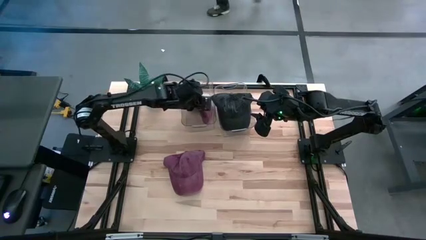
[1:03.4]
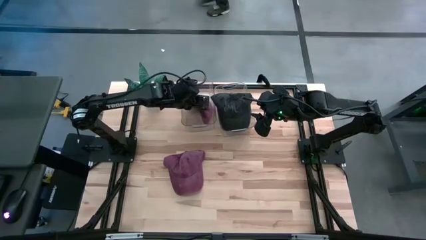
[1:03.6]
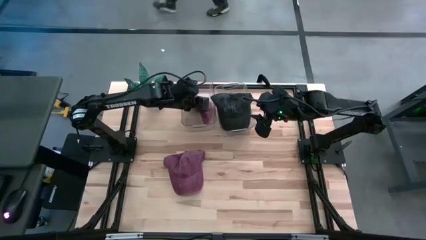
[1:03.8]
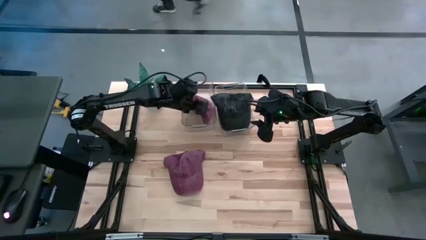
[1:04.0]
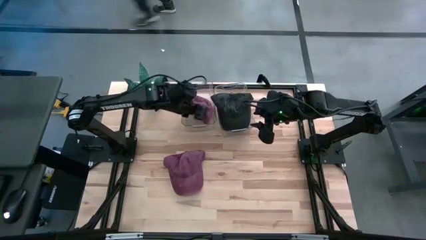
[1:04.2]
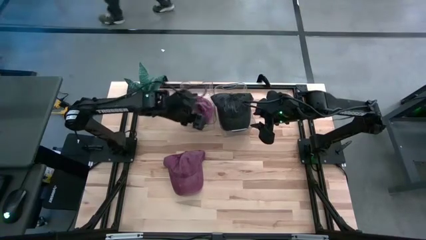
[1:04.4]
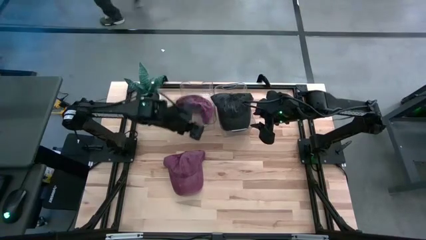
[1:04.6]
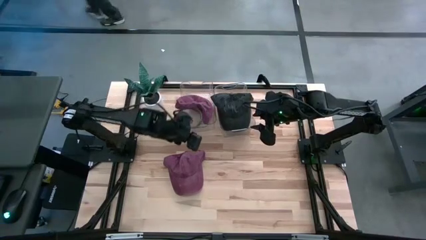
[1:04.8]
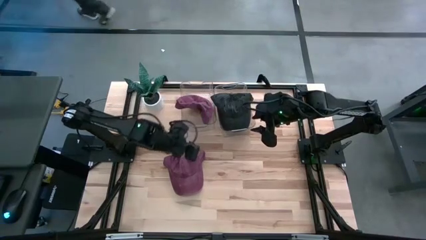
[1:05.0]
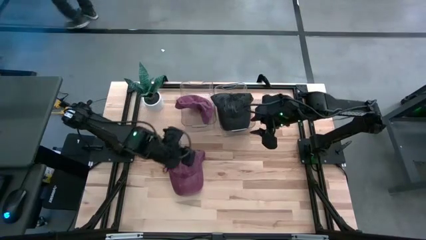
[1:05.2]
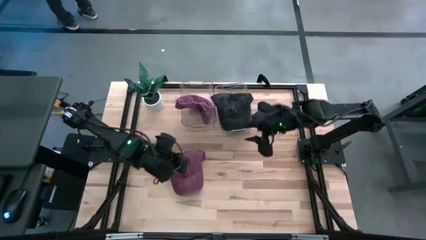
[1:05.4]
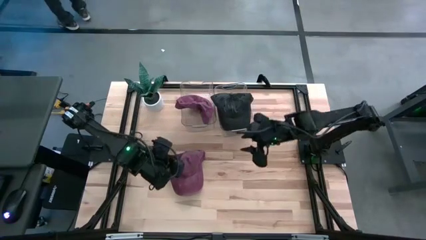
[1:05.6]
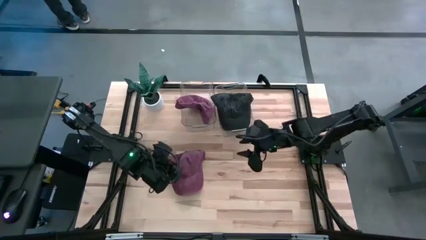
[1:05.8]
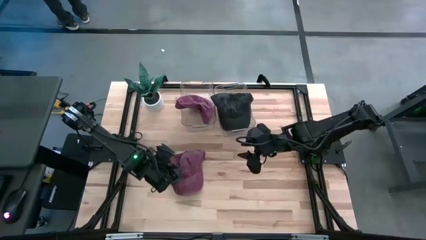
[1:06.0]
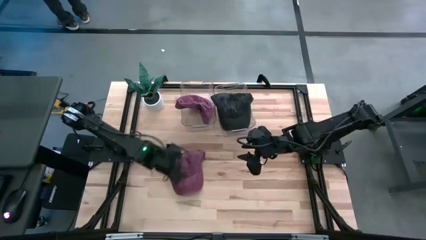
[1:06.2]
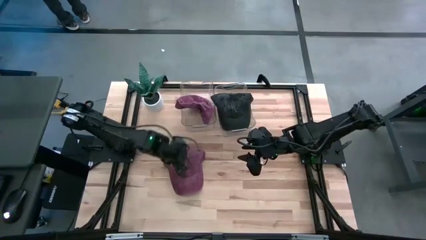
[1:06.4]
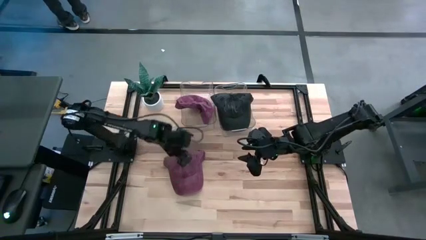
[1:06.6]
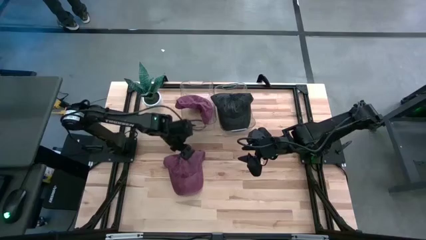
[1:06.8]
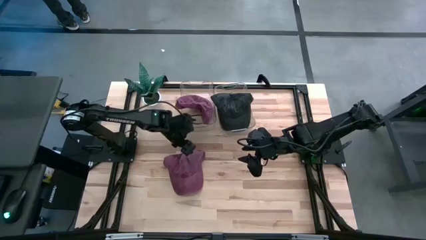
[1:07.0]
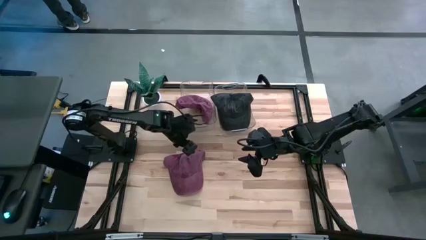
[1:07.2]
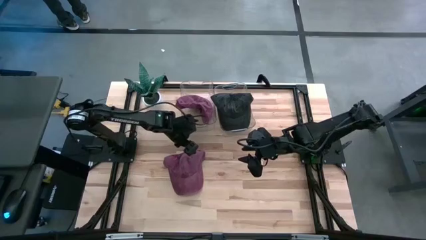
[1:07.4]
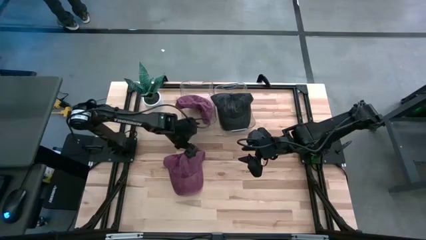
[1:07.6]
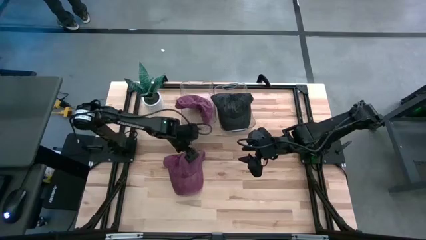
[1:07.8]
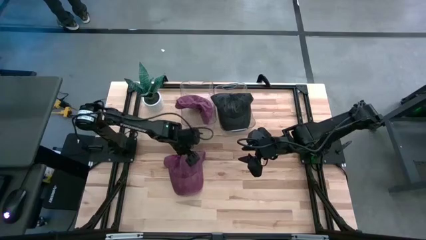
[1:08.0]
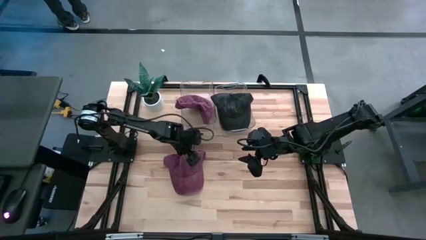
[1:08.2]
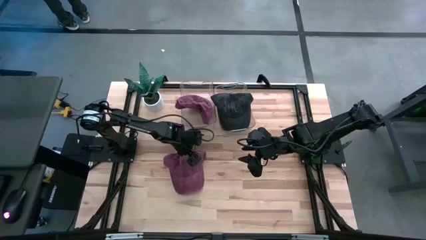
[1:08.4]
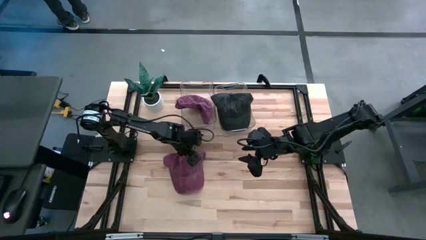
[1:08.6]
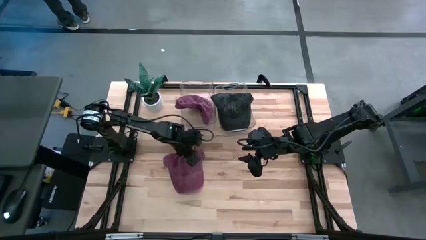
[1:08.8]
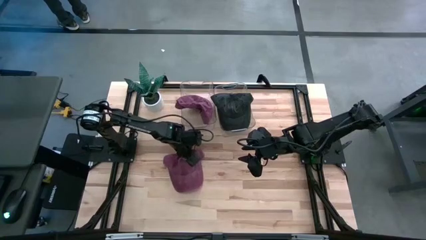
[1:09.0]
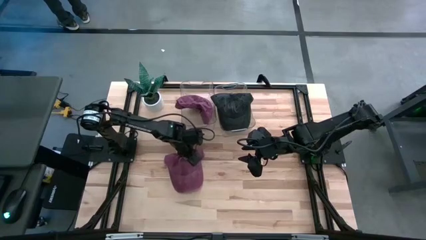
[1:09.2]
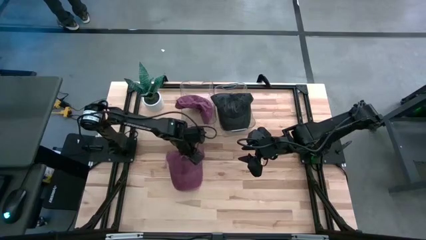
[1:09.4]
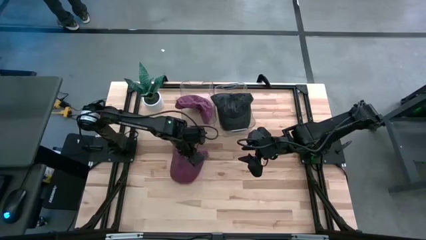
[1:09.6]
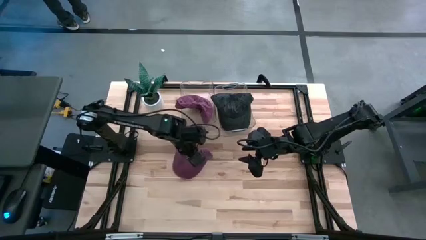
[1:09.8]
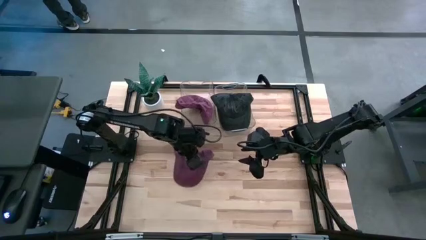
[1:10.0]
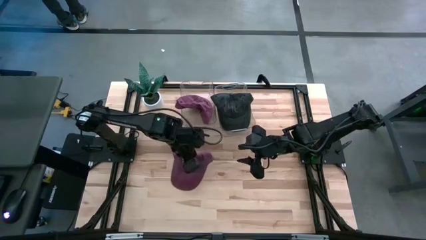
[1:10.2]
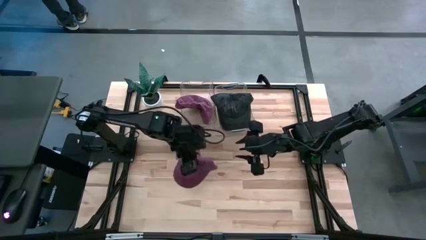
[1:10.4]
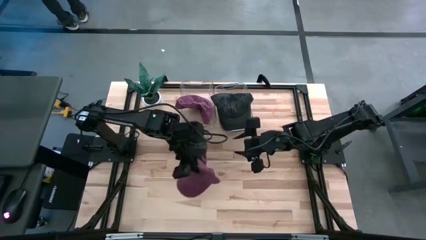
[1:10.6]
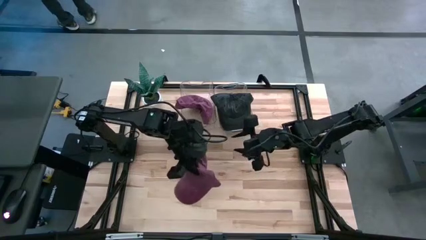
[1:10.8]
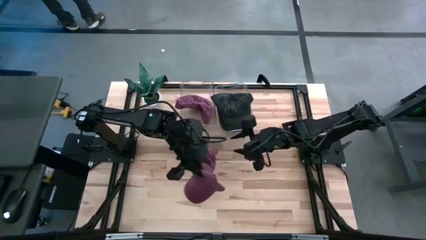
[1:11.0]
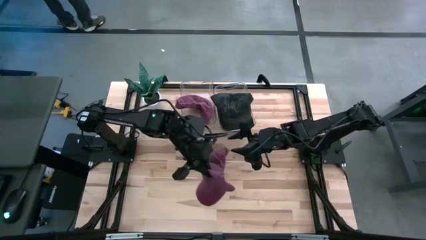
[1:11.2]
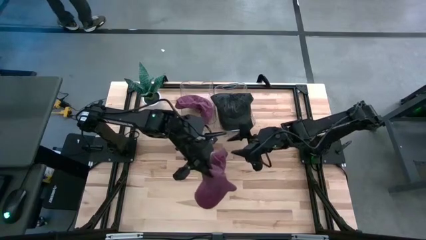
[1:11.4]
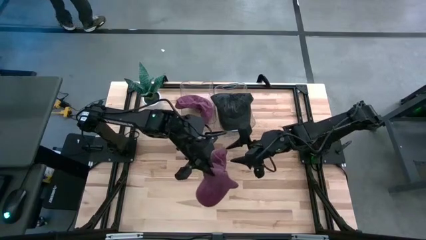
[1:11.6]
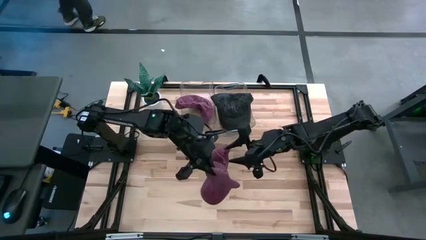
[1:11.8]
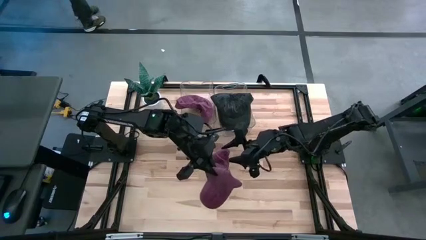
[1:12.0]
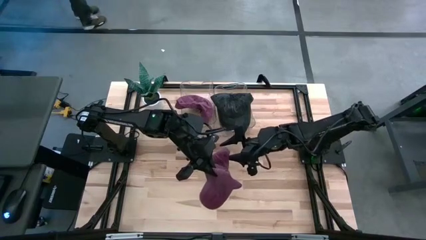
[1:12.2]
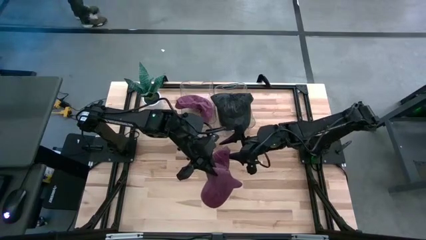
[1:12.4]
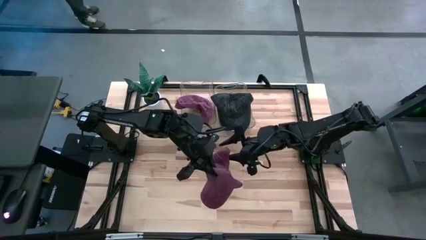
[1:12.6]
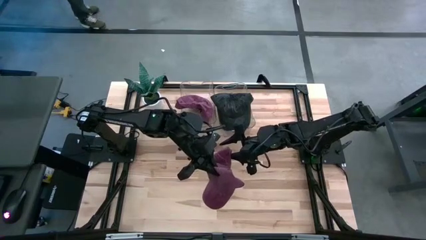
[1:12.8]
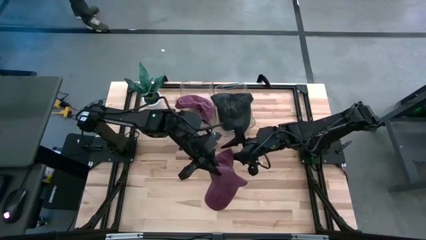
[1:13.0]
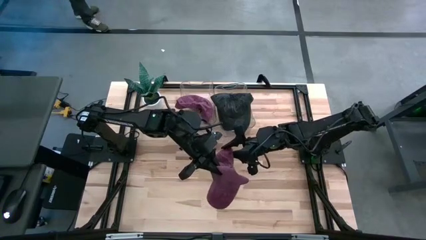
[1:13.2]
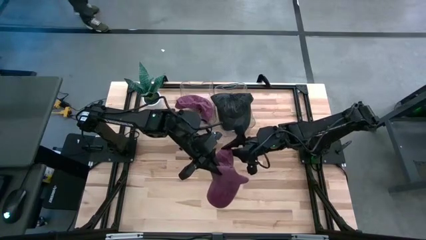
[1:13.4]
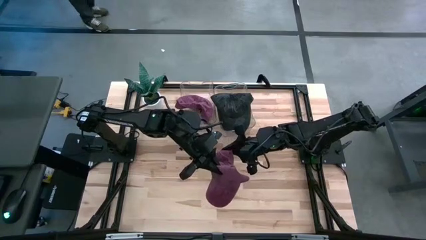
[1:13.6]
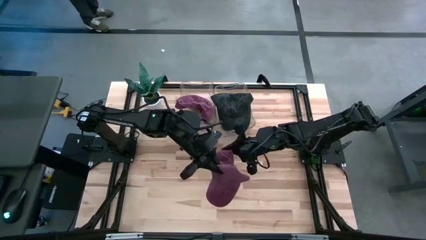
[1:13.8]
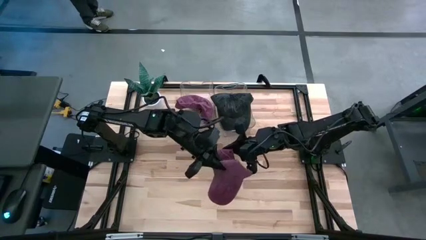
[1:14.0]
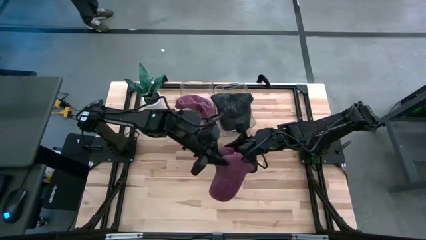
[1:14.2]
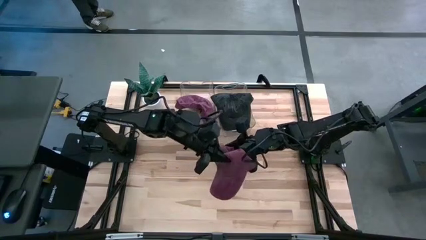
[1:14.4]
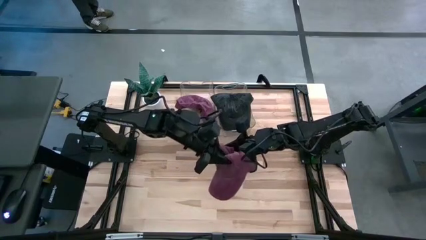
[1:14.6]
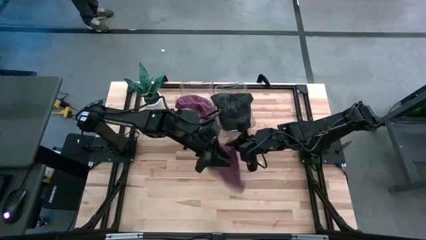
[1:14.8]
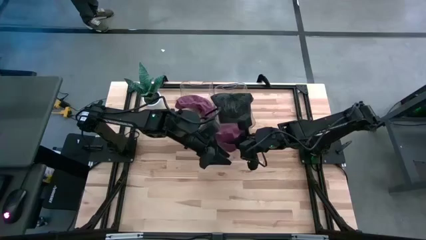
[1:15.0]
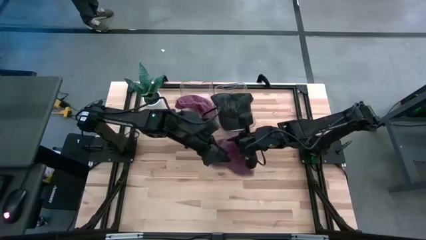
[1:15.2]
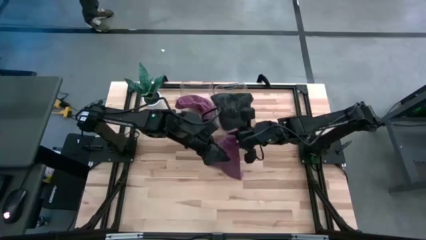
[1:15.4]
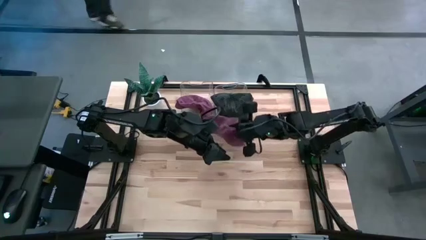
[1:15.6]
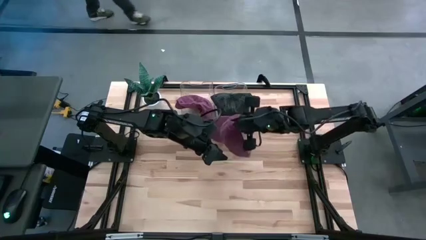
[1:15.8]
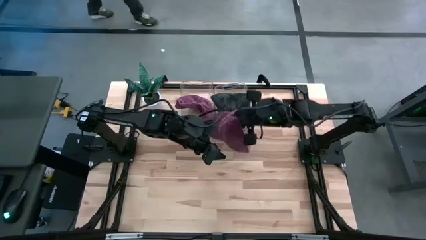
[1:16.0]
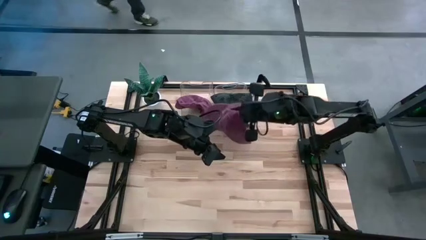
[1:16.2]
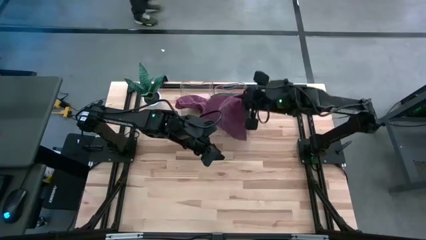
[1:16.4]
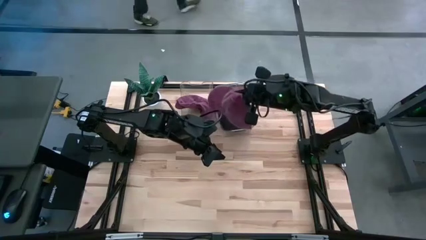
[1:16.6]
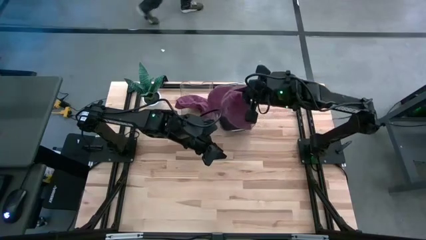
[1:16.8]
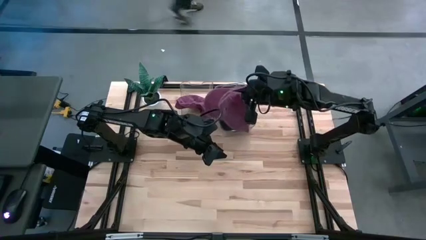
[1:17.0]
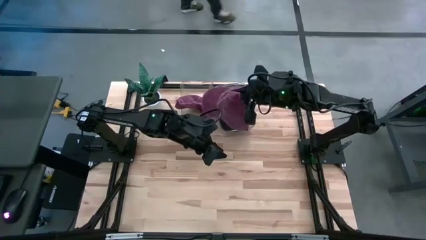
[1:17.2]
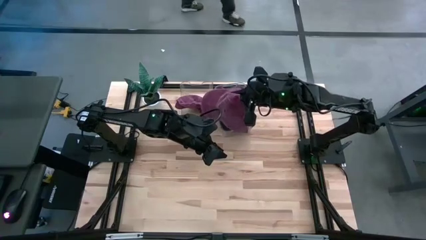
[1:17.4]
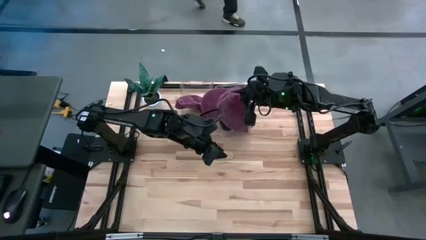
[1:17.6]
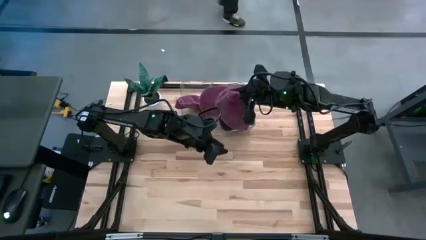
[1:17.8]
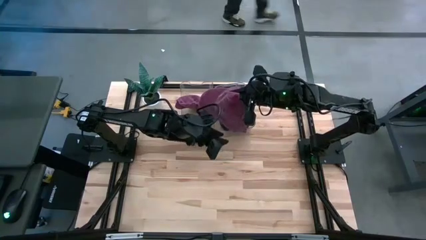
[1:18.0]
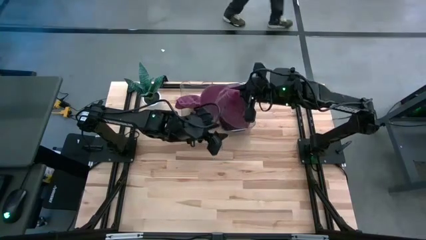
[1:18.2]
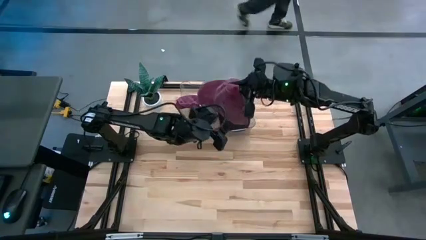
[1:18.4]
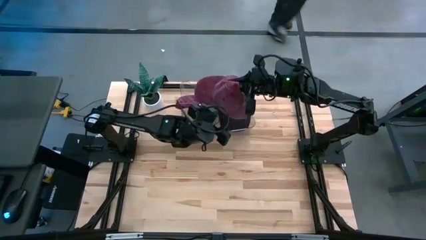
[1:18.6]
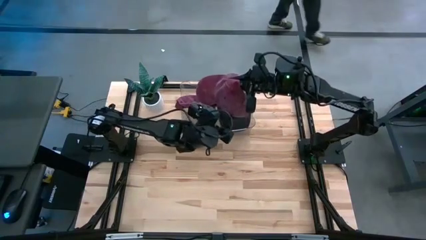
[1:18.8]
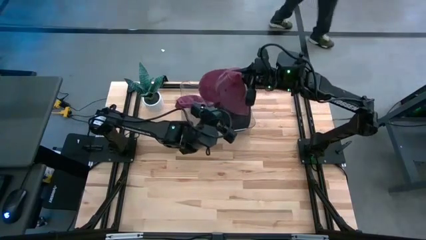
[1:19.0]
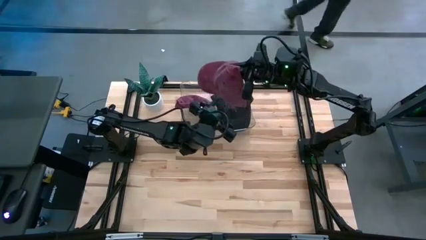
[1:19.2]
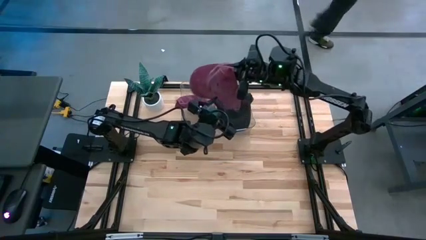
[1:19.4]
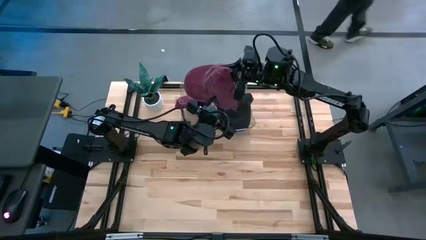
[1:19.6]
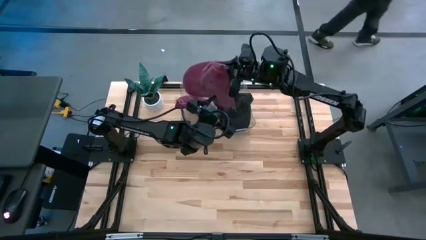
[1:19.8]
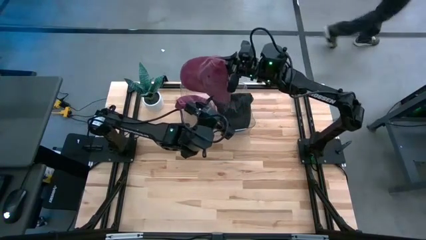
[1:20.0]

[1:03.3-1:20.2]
Task: Pick & Place hat
Put the dark red cap into the left transparent bin
